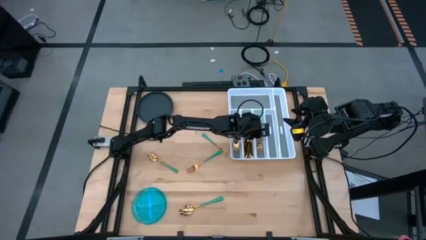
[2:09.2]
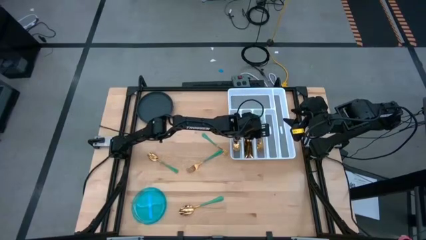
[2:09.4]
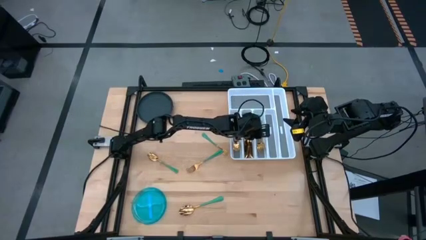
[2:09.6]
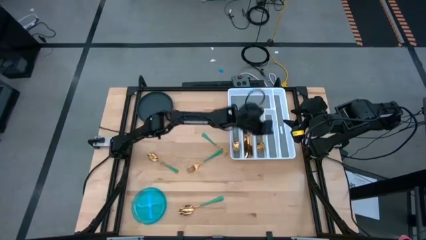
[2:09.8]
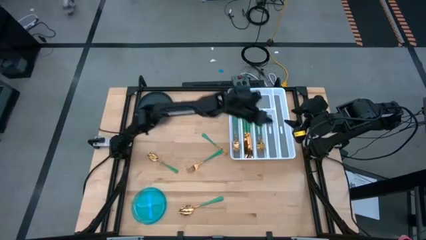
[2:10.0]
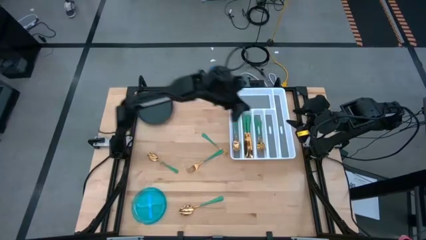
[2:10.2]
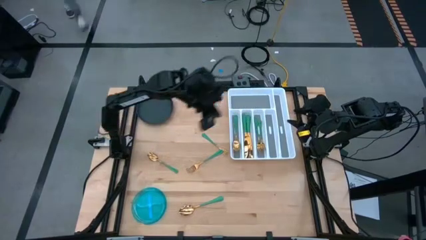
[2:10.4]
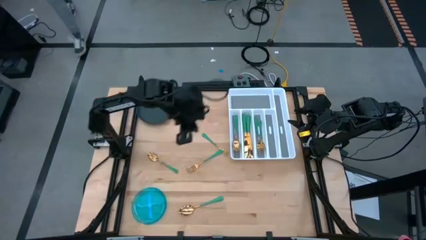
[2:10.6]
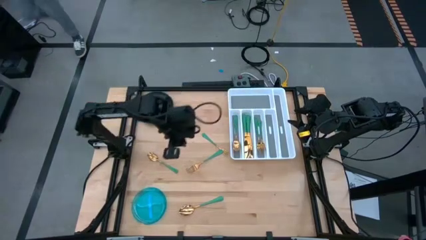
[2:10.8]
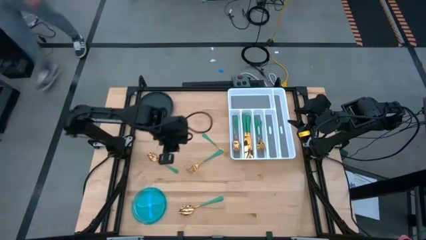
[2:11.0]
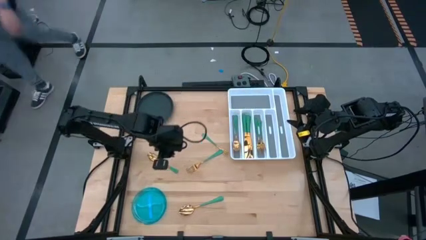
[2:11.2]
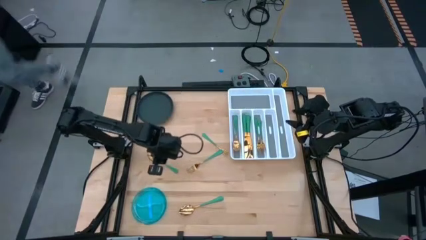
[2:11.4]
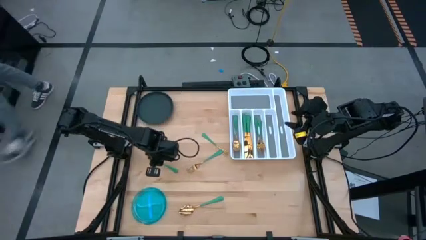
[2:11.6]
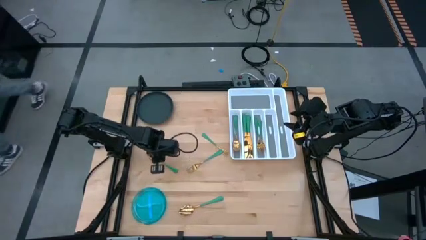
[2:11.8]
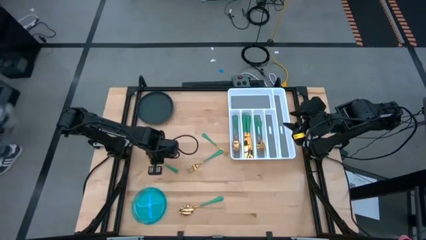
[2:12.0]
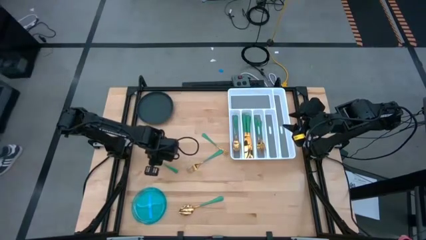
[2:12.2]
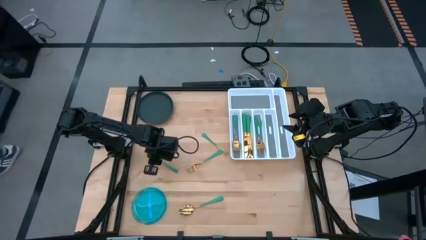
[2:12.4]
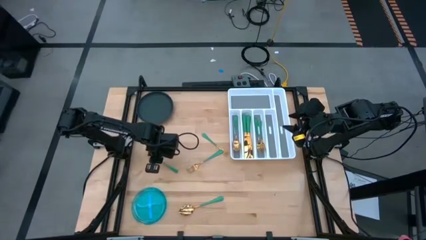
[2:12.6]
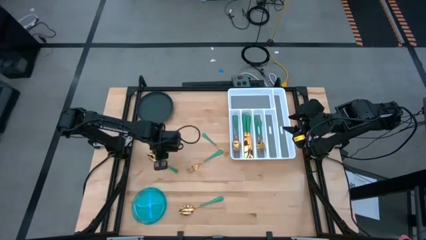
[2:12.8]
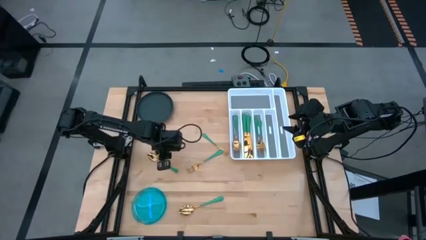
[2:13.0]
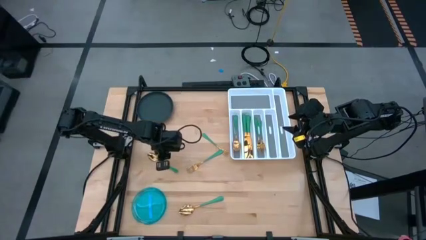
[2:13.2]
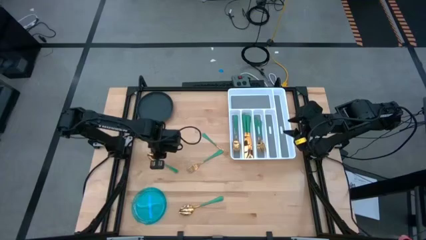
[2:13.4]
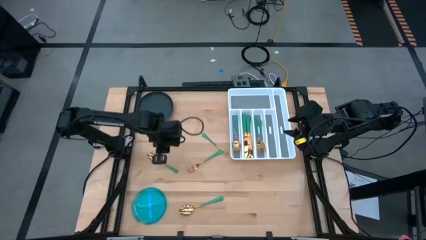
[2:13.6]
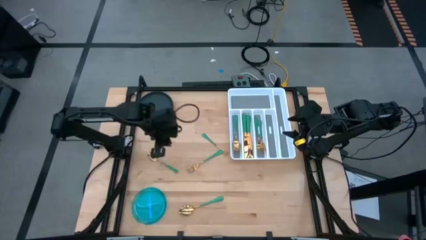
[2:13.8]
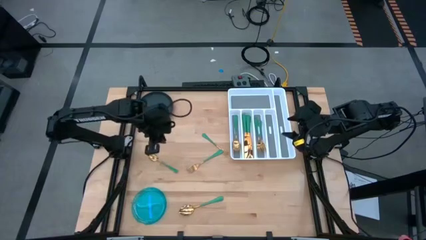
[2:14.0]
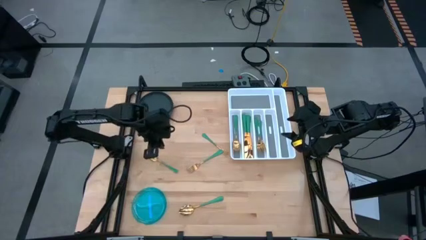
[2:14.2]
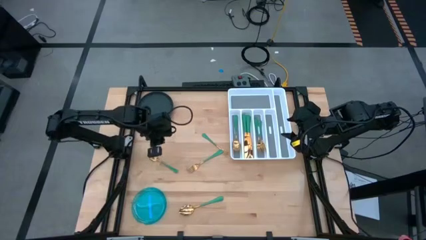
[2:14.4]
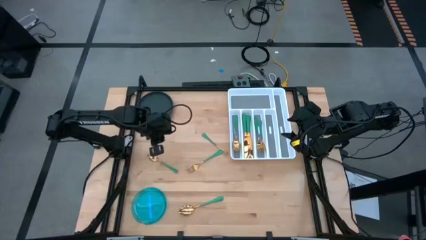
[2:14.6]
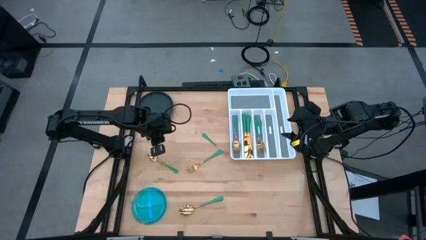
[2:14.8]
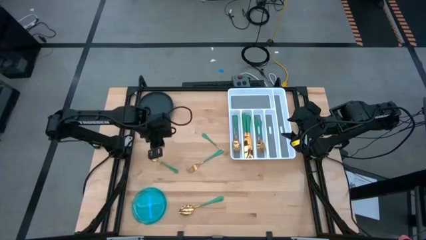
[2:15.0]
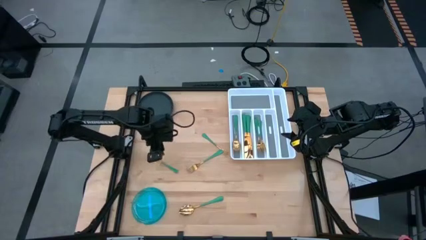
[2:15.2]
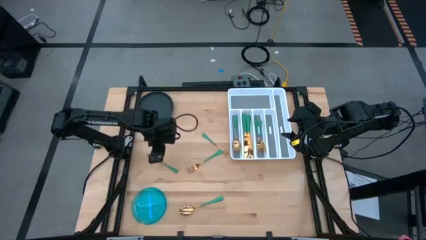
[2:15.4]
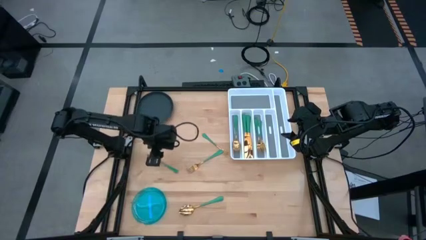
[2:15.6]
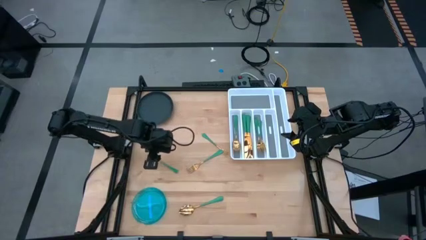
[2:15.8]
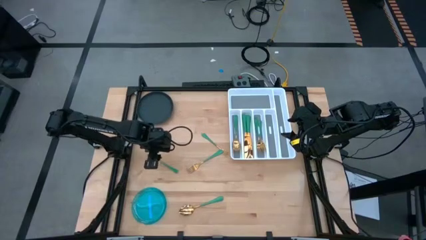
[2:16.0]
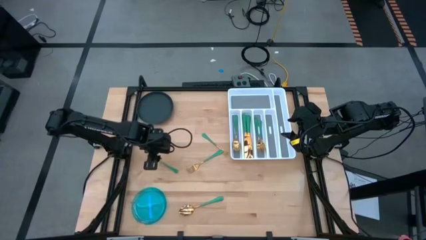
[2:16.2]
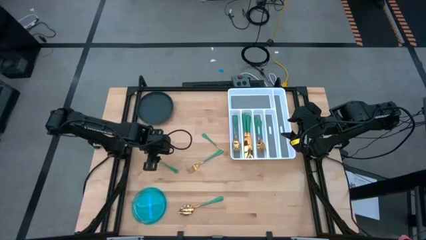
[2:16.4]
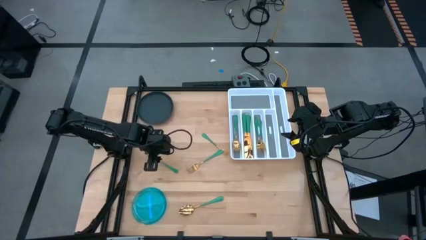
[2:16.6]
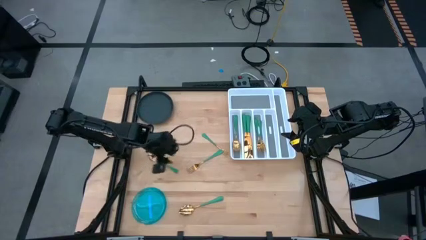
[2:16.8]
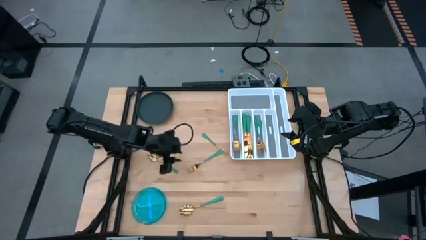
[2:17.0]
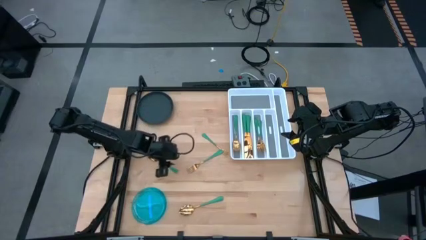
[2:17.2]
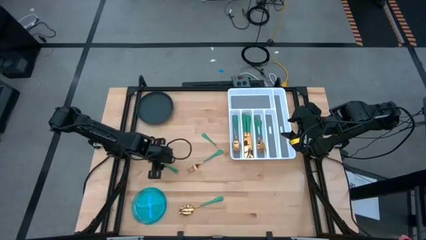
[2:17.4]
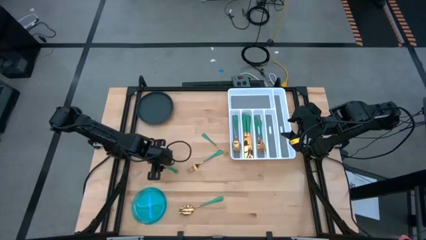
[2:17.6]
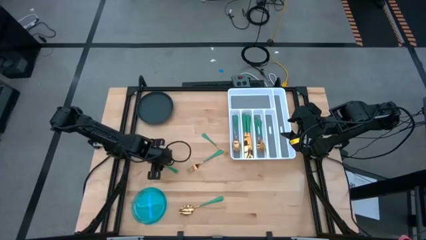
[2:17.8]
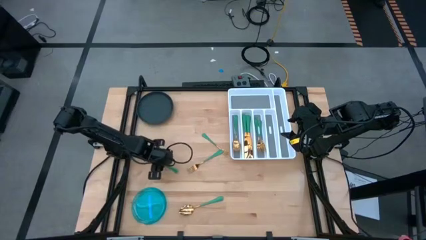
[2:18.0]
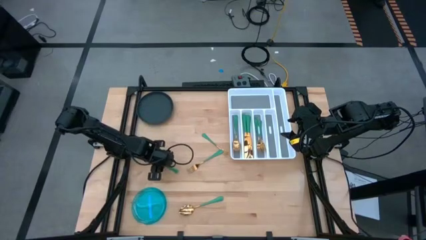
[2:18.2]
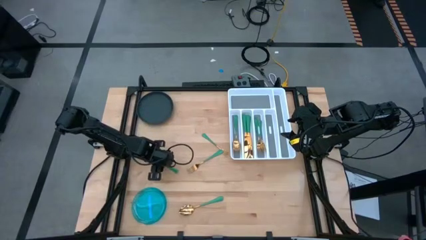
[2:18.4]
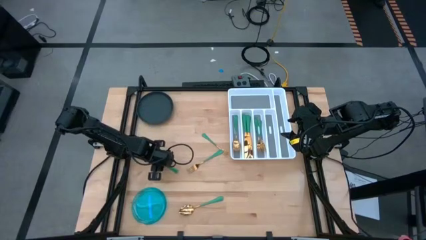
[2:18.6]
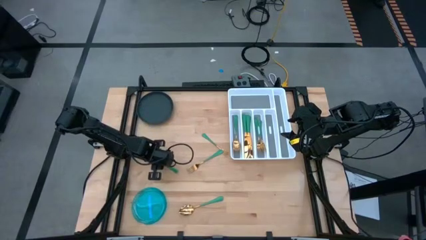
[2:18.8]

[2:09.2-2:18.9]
Task: Sort silverware
Put the top green spoon into the left slot of the white silverware tray

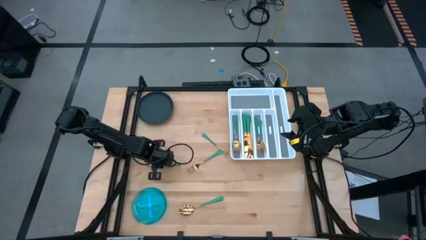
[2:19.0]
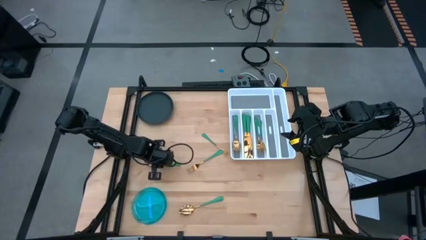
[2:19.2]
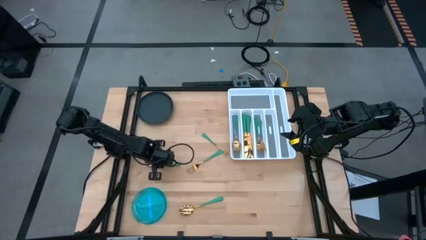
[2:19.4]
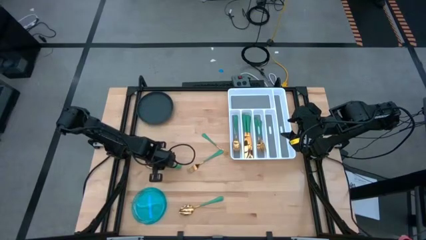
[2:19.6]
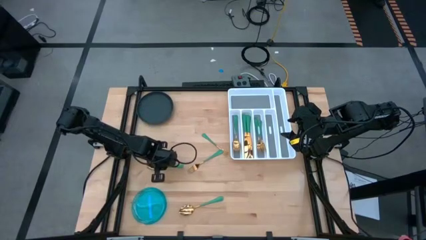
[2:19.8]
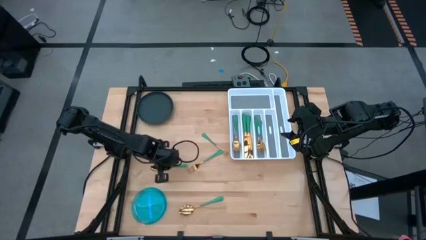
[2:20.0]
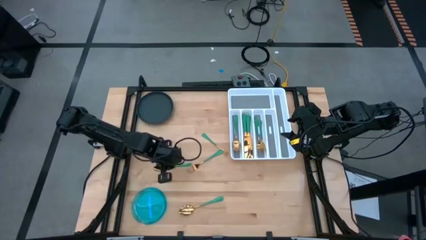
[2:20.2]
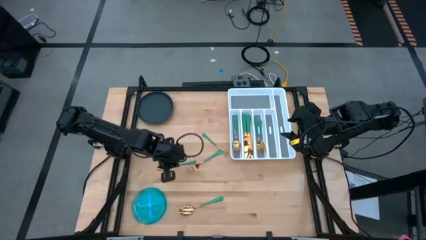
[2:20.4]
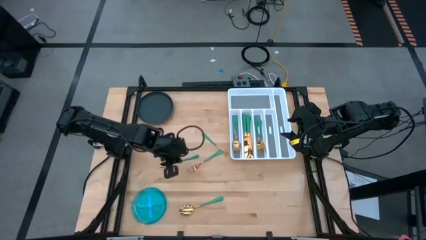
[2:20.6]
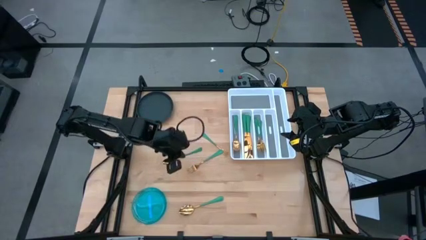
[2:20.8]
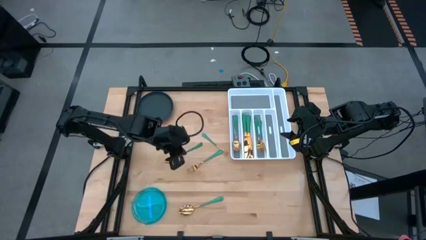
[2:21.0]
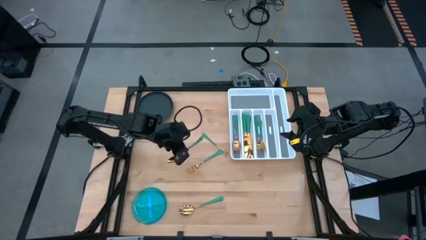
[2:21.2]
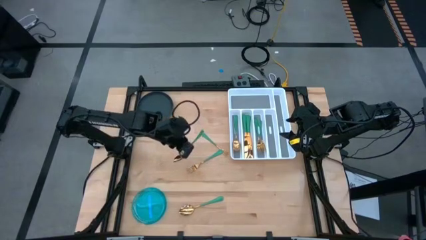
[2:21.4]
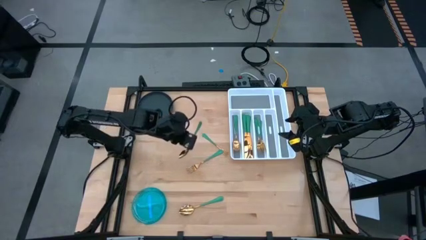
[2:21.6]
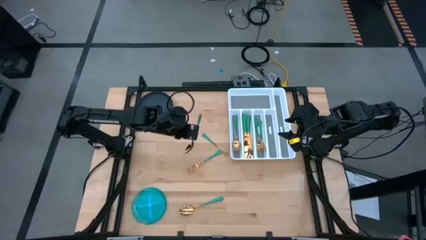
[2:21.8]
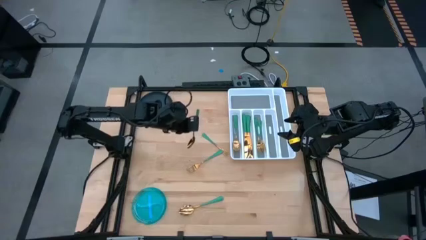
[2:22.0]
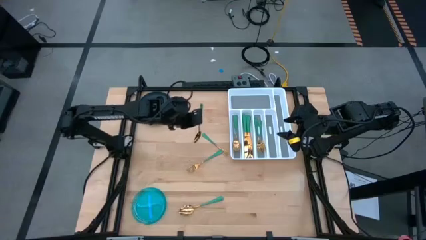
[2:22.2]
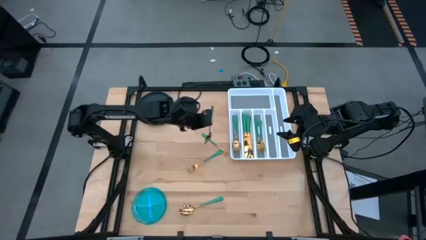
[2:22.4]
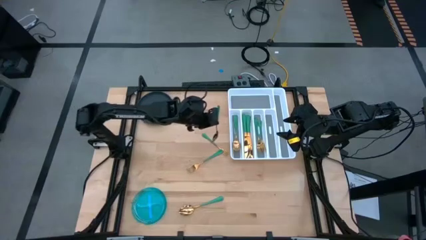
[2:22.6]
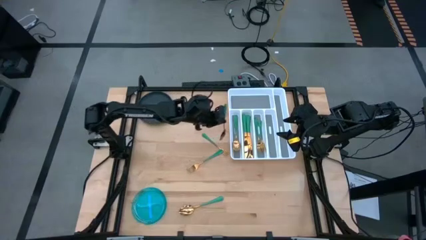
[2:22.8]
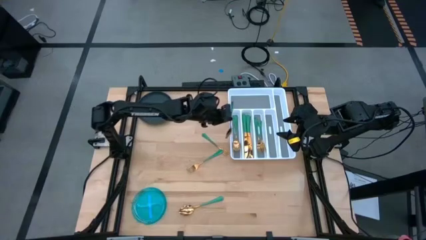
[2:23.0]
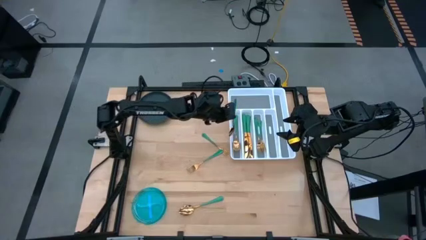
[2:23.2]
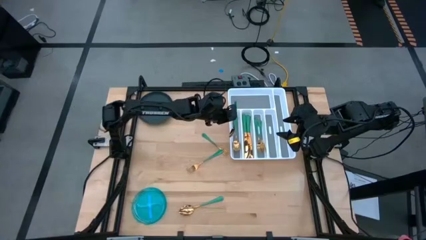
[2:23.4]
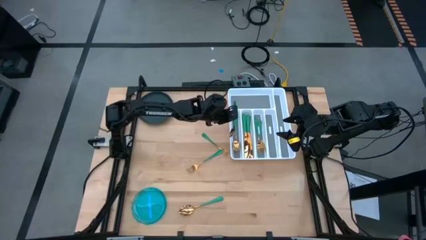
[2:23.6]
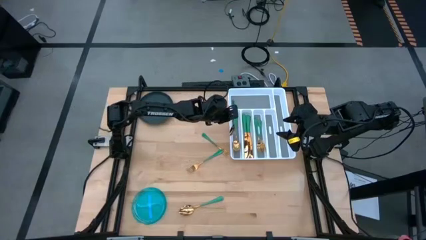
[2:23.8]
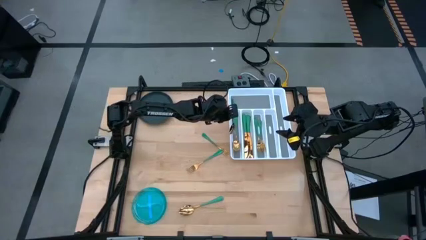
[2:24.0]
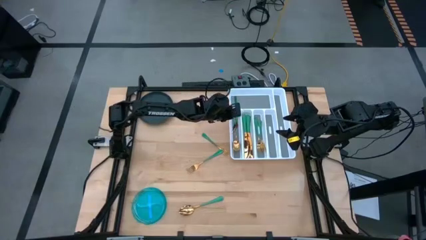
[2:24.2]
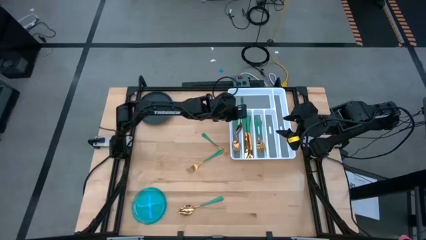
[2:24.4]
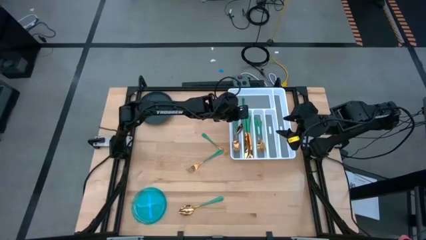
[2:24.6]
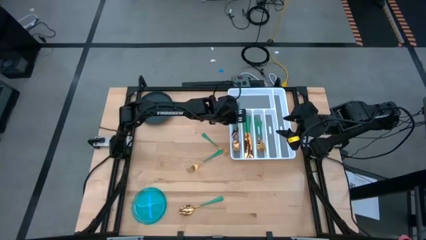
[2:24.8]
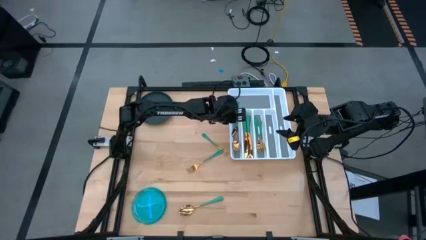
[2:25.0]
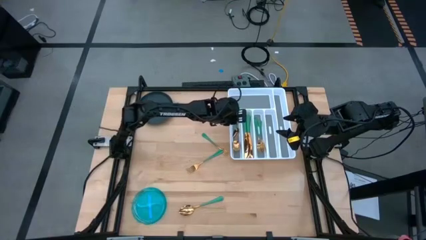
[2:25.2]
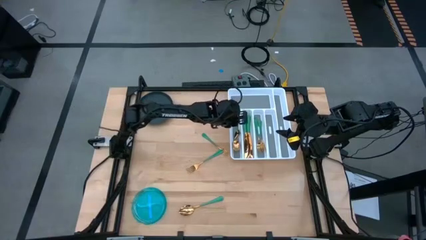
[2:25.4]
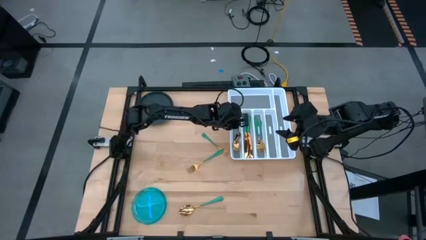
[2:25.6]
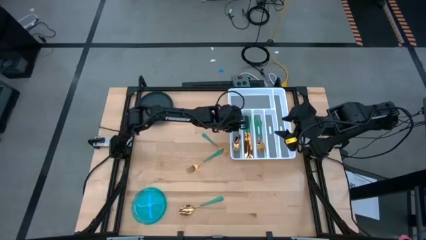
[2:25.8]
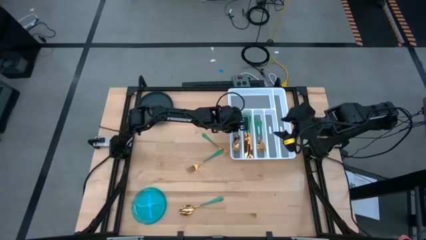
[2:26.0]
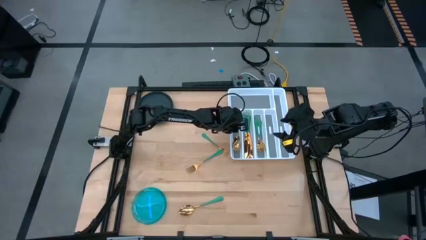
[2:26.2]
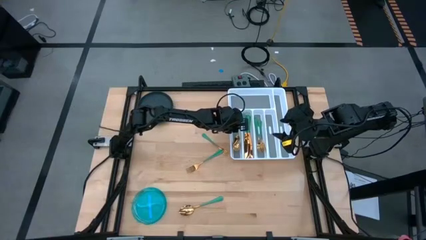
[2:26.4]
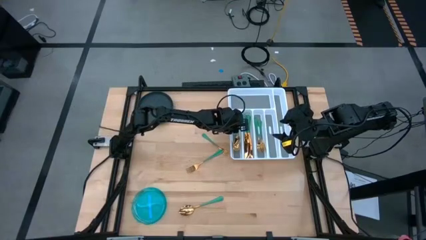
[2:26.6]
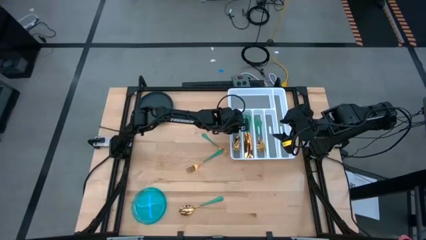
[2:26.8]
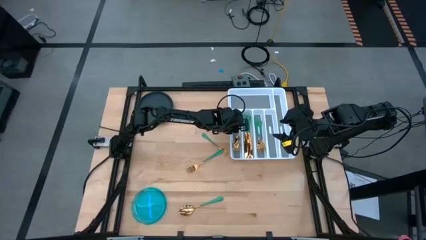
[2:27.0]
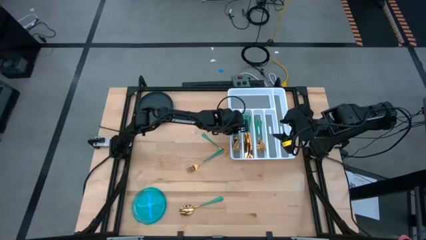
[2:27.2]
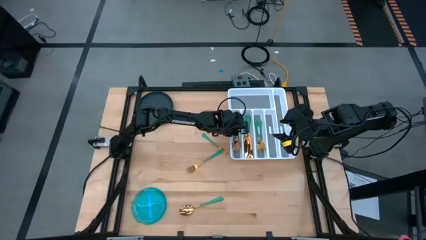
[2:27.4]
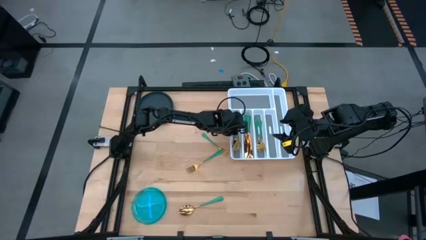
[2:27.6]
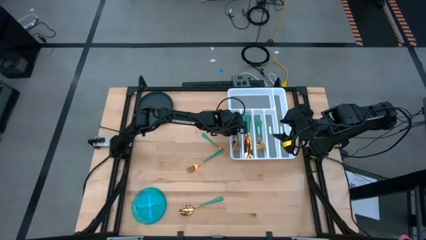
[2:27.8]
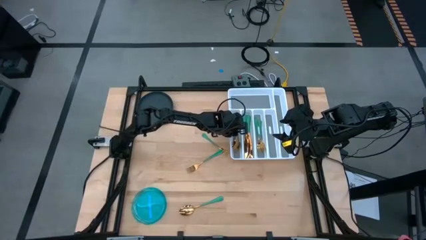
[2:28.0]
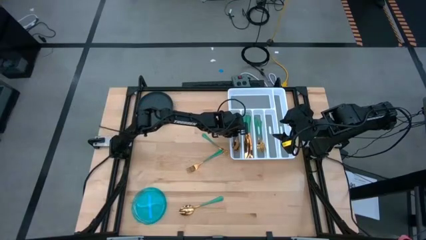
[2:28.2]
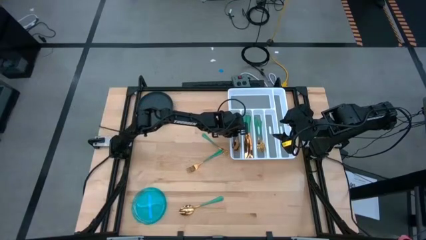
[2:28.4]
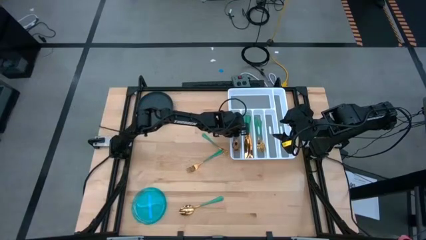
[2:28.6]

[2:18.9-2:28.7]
Put the top green spoon into the left slot of the white silverware tray
